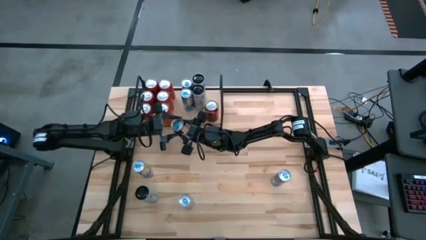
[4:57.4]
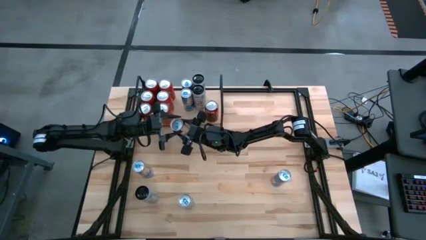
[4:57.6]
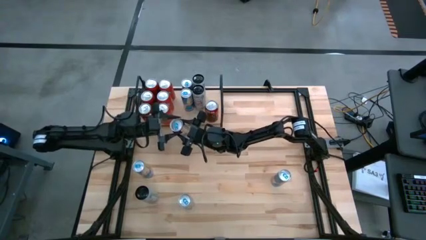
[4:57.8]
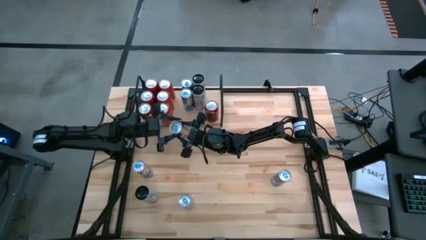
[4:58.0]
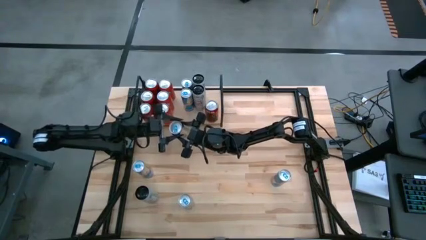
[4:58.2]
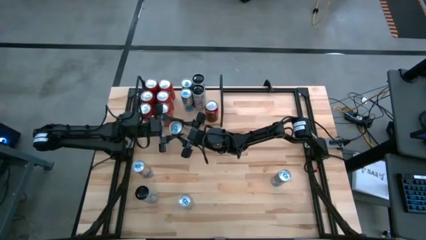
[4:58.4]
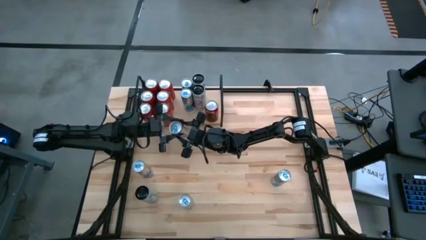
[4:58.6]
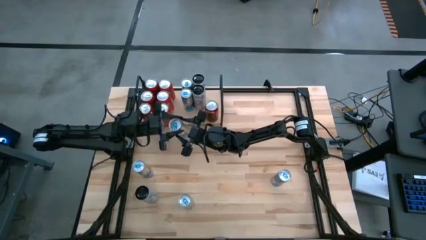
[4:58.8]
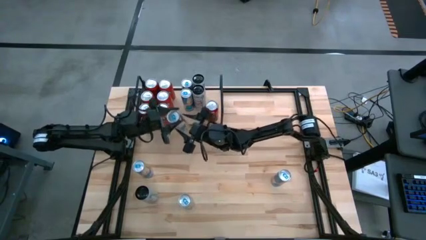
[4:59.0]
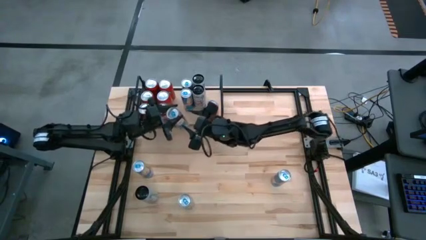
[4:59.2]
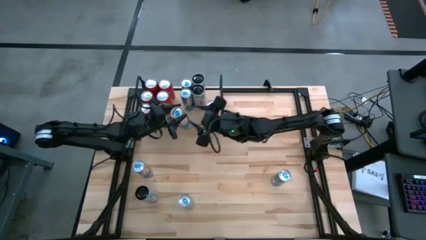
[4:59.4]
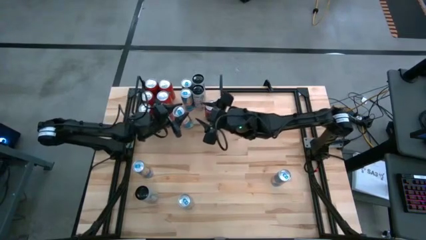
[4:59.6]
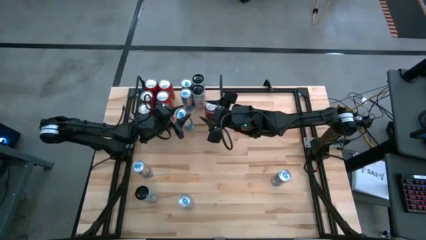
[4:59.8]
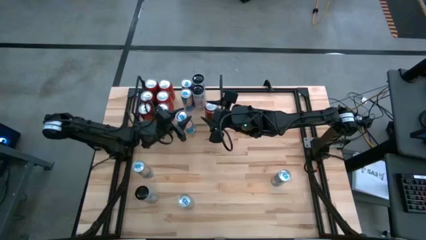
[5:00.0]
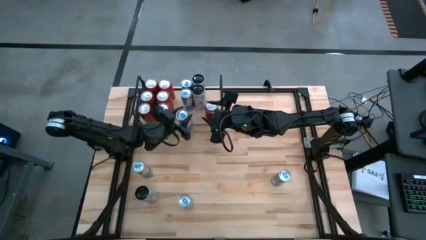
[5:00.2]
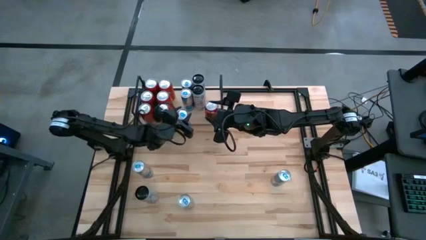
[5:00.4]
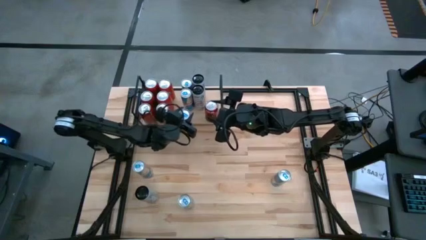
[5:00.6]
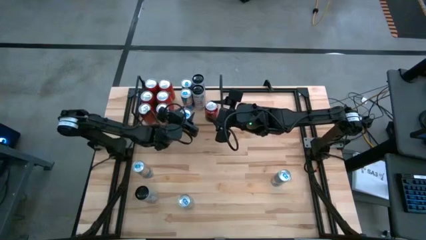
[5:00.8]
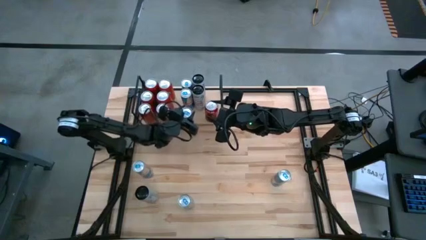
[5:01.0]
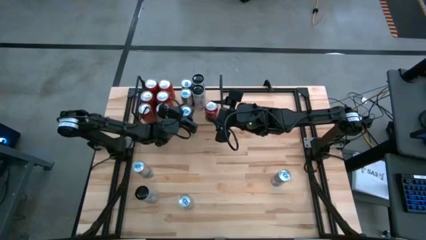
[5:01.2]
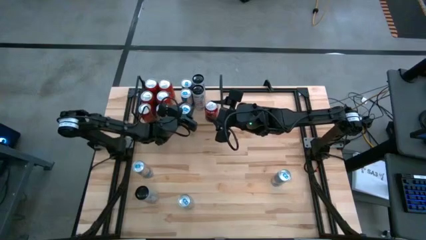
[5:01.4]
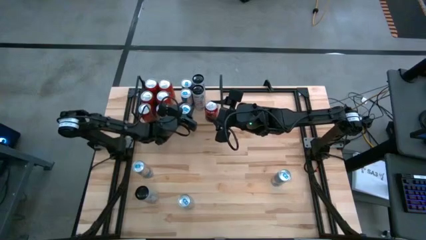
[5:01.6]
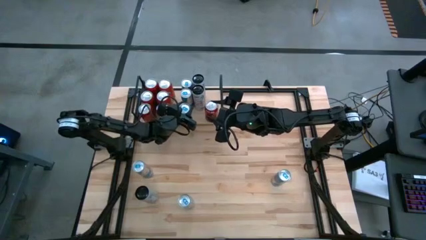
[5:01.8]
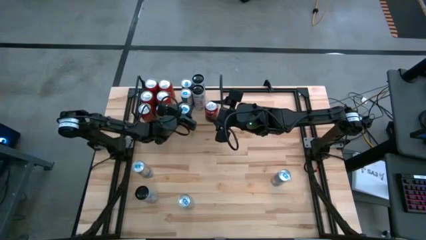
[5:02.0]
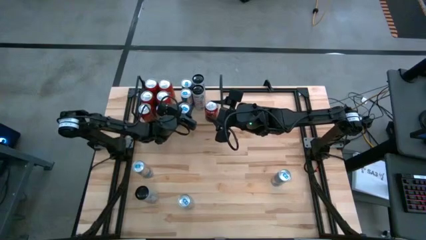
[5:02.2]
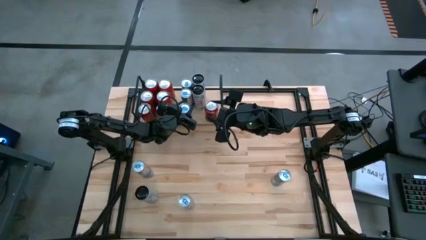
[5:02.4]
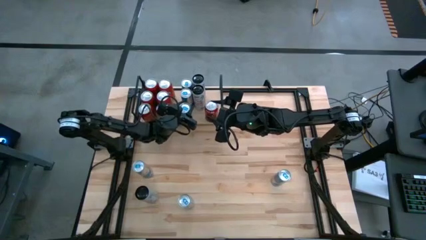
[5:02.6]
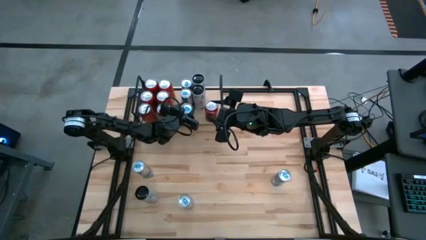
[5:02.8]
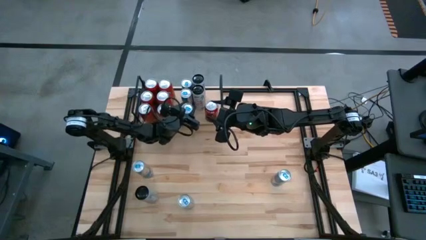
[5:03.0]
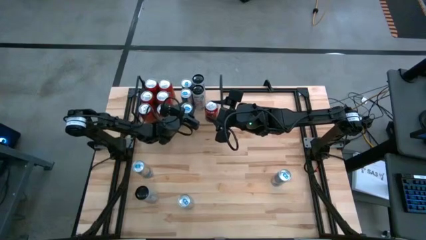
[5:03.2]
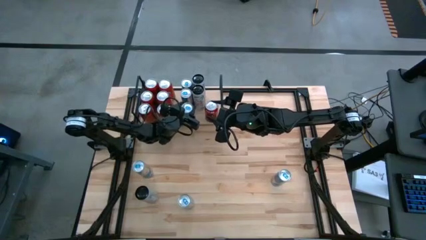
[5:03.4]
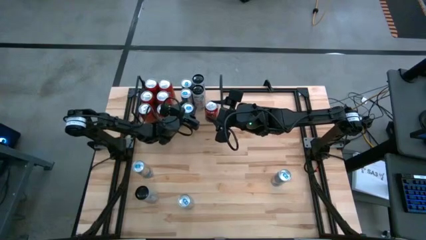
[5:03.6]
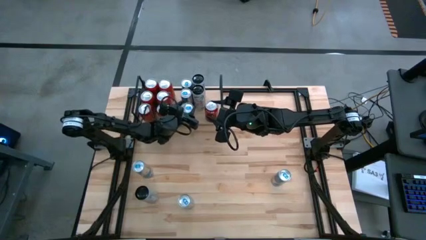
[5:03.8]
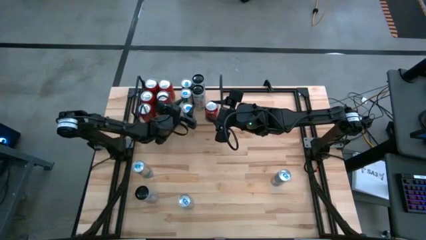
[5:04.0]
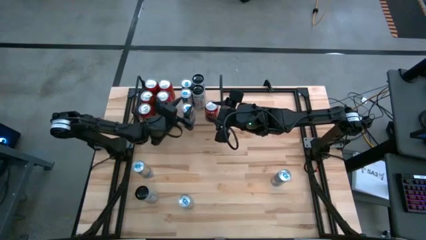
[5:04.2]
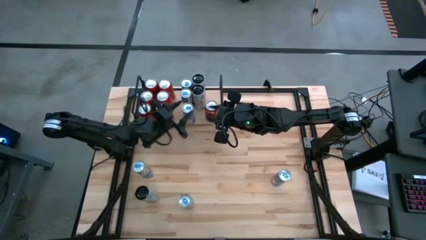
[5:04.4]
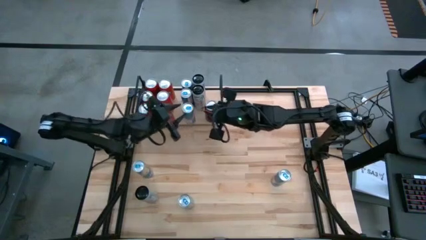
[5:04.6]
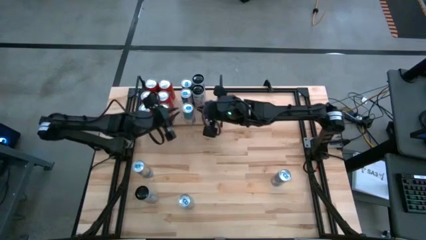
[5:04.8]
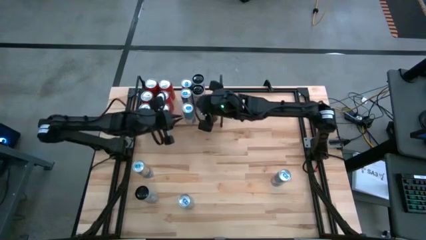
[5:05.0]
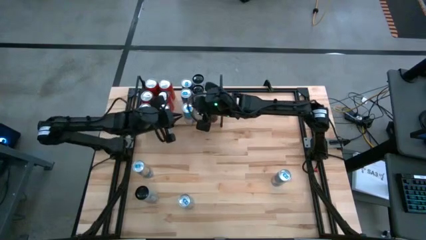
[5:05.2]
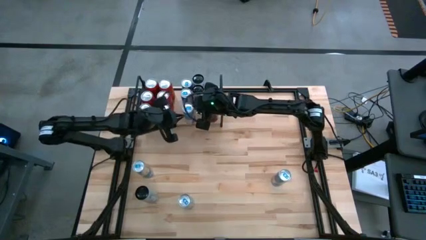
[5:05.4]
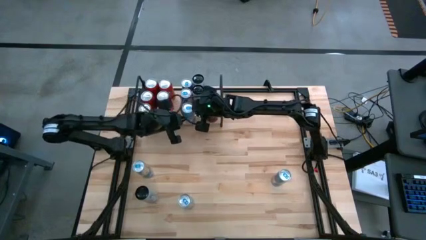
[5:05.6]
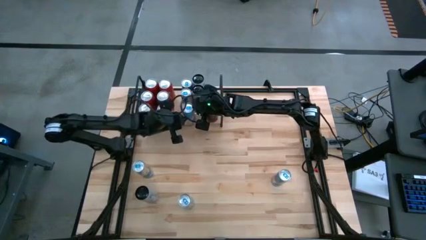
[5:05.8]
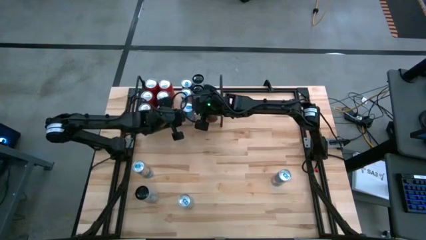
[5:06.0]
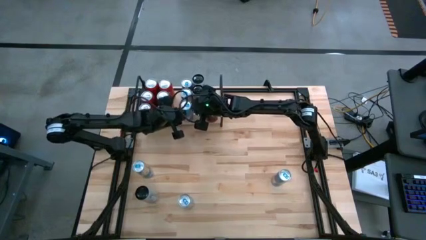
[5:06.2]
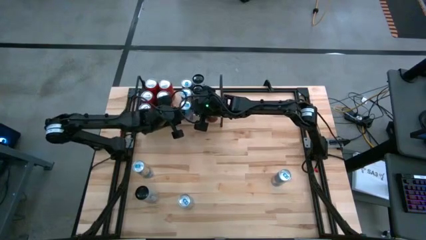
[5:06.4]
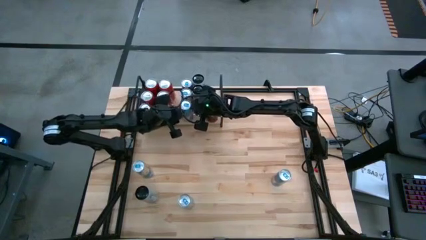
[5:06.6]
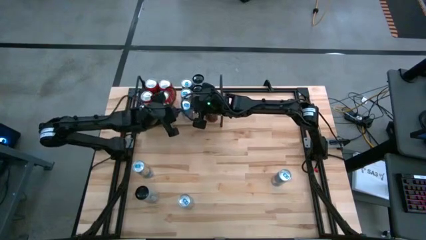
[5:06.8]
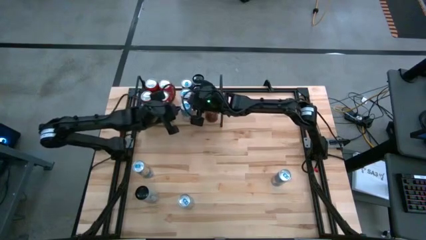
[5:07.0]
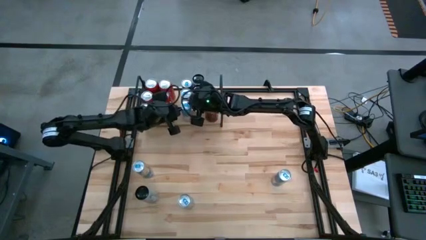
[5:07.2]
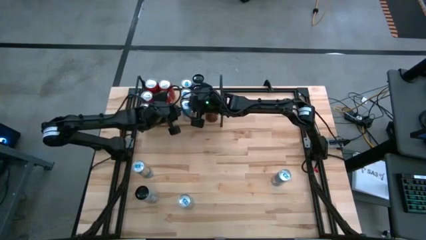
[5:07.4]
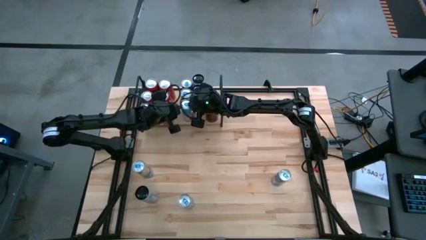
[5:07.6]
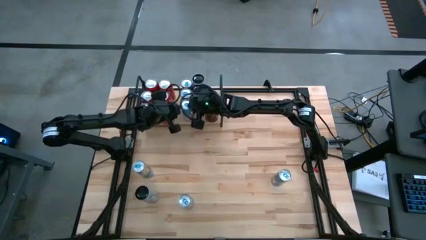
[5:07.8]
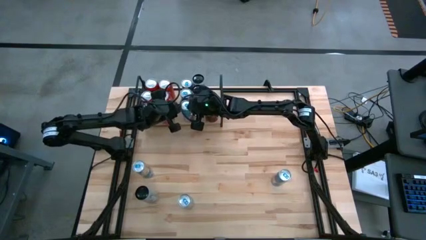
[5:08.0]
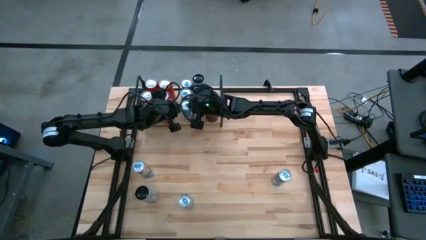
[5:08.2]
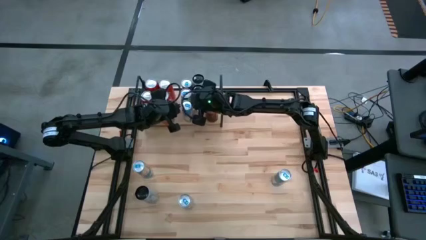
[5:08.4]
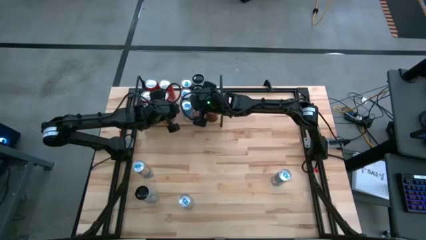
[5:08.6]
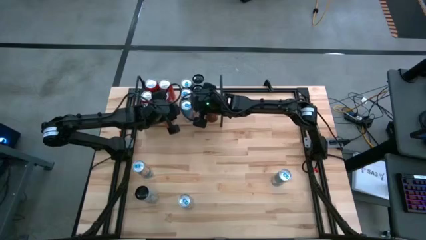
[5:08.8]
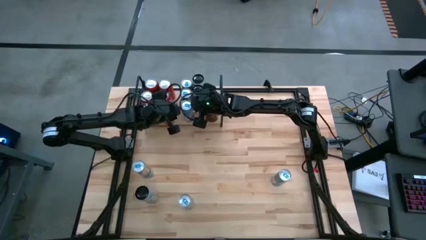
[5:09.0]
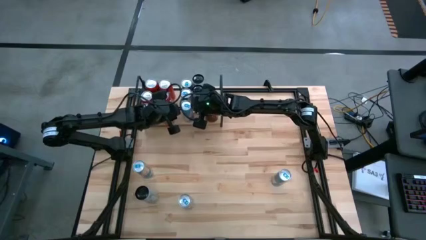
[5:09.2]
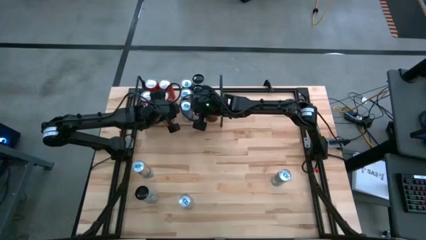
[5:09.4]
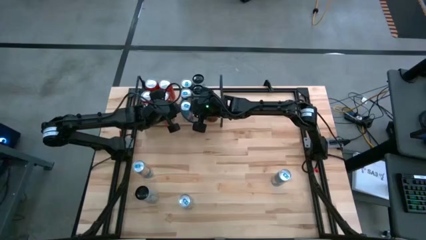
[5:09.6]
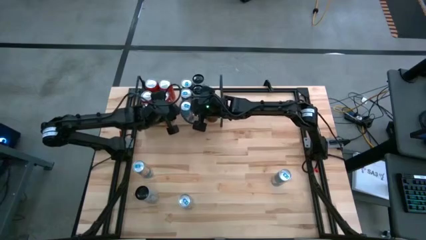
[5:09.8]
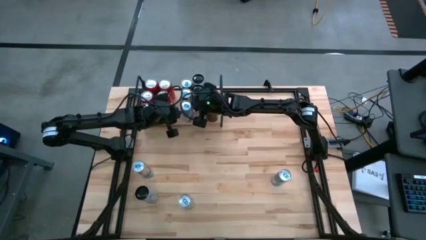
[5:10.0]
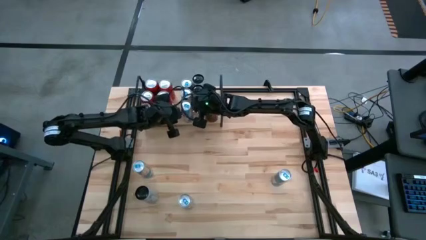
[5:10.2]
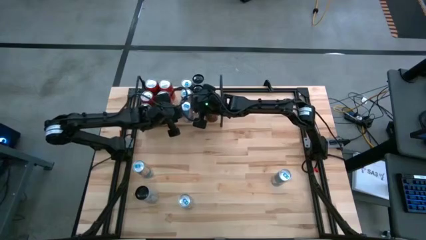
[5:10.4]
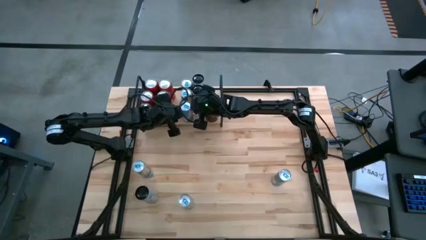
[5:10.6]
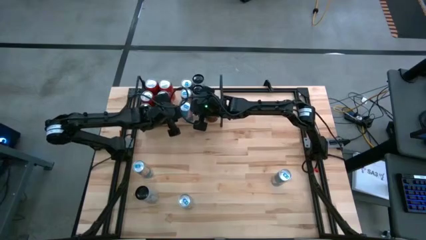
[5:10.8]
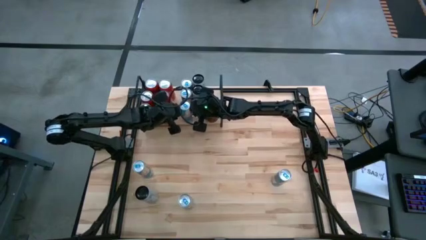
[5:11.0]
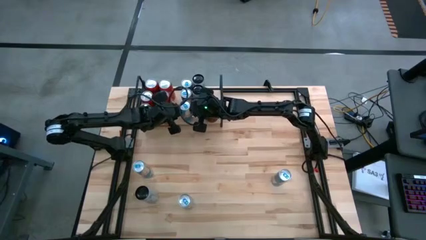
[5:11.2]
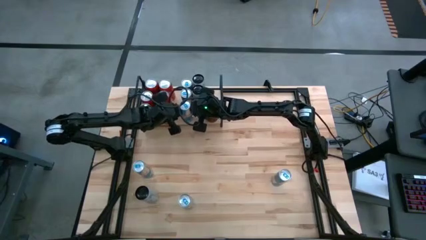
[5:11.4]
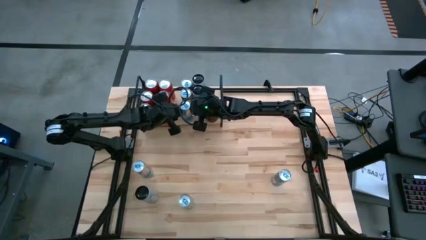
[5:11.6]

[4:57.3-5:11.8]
Task: Place canned beverage on shelf
Put the blue soda can on the shelf aligned with the other blue soda can
